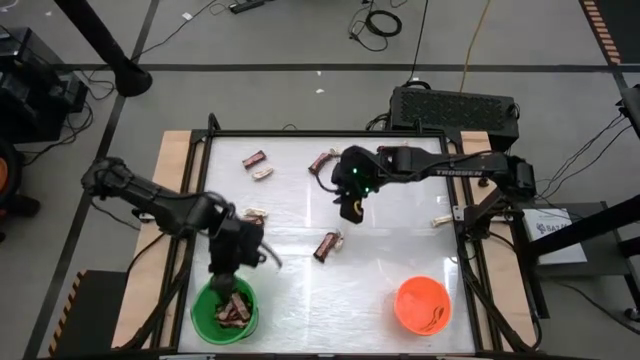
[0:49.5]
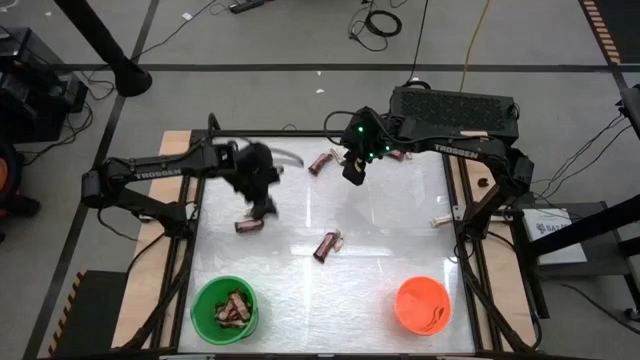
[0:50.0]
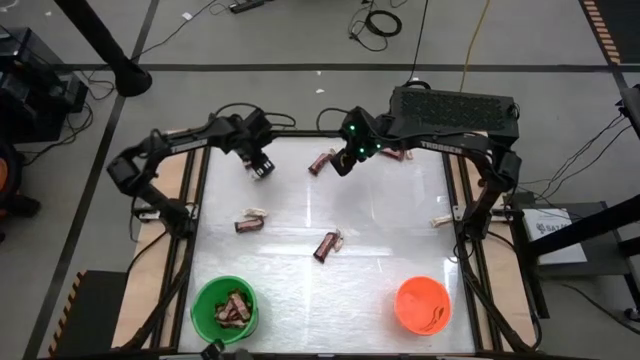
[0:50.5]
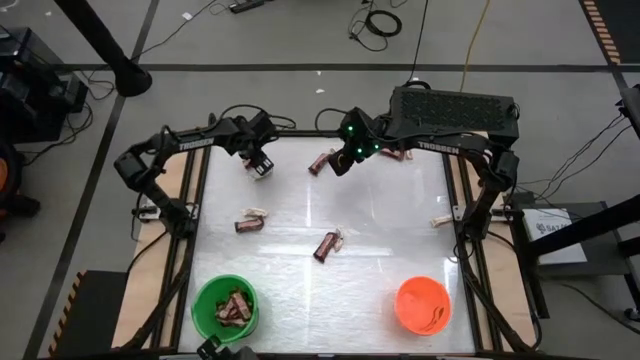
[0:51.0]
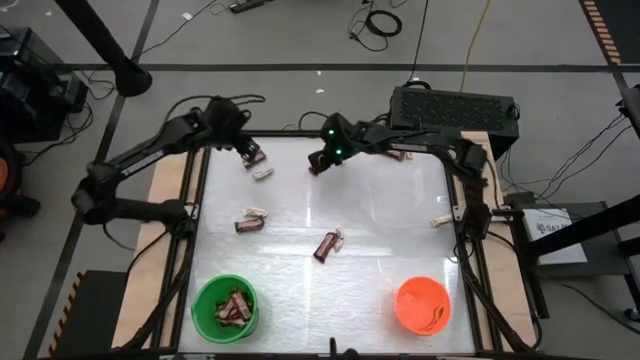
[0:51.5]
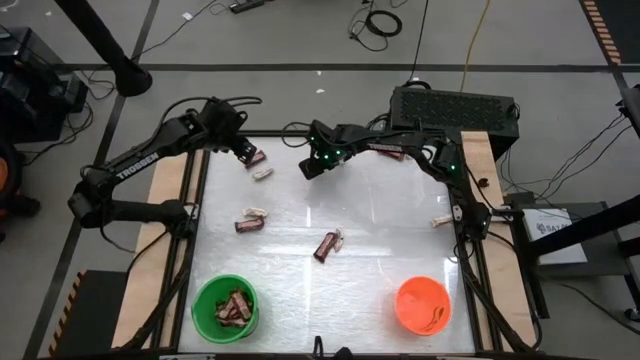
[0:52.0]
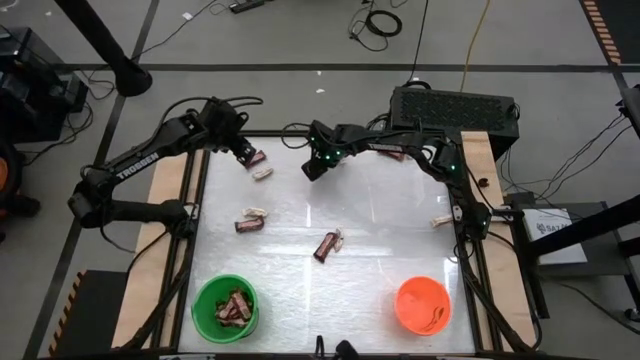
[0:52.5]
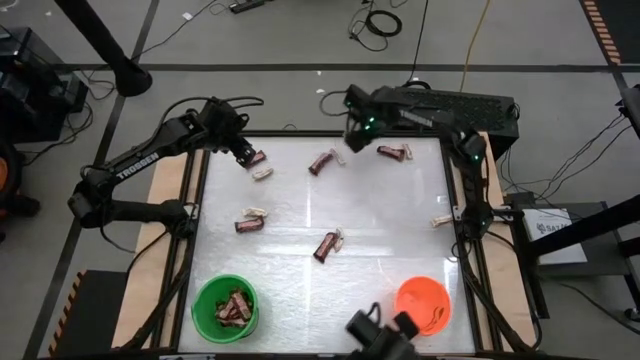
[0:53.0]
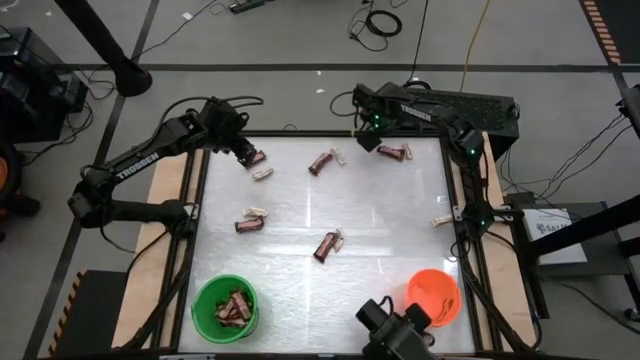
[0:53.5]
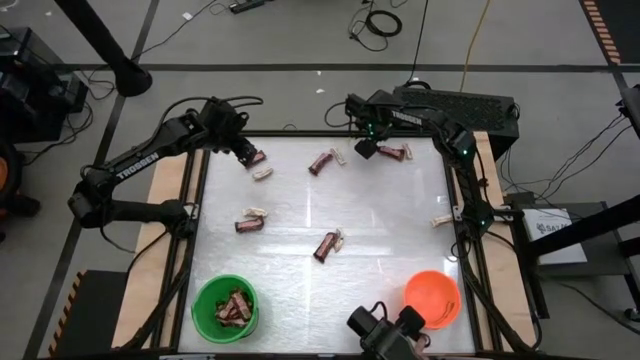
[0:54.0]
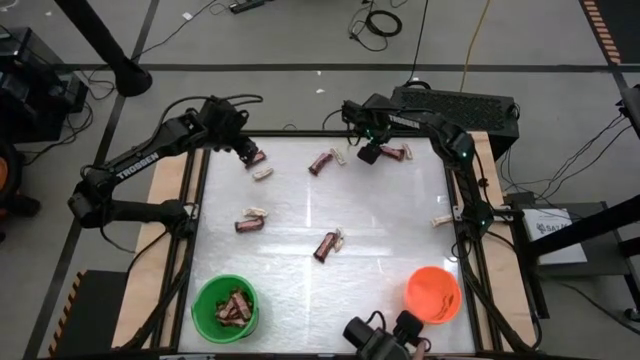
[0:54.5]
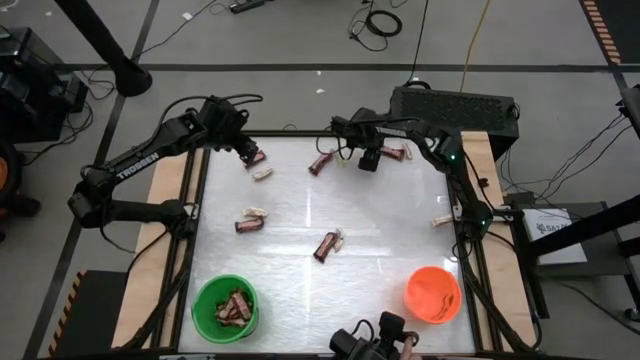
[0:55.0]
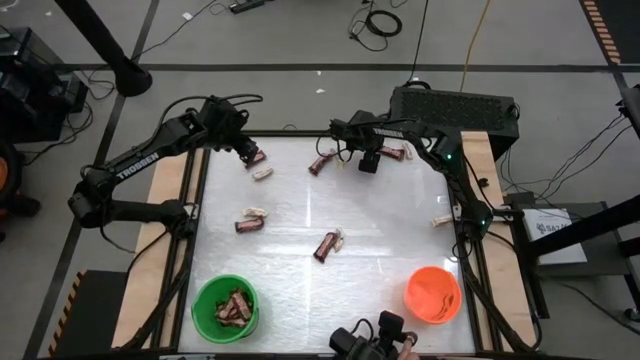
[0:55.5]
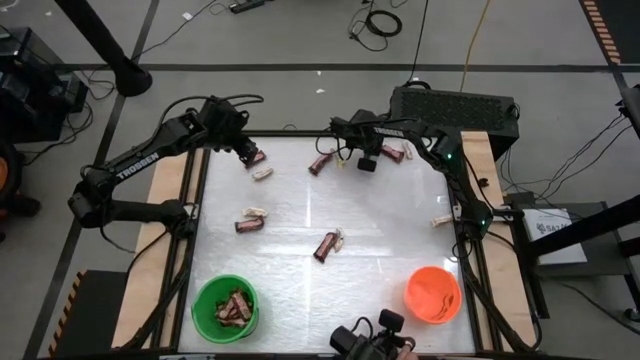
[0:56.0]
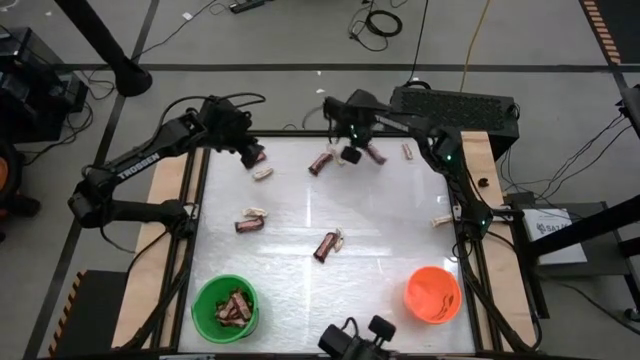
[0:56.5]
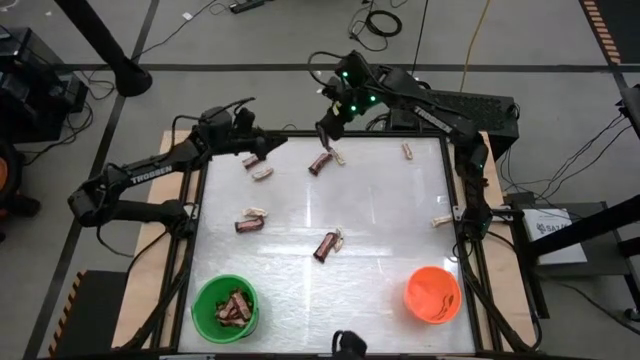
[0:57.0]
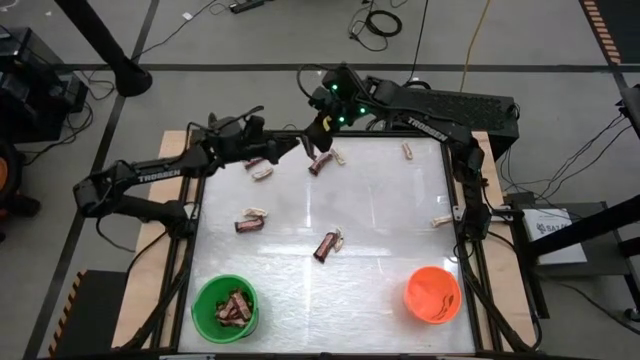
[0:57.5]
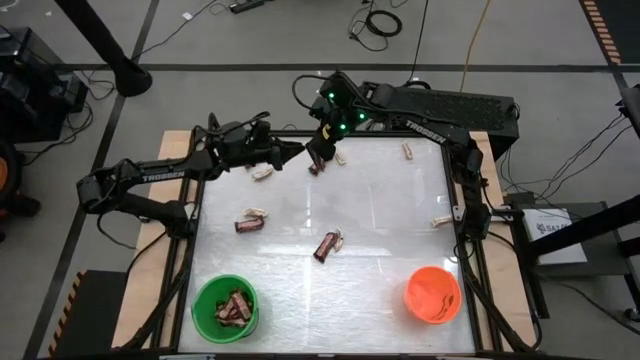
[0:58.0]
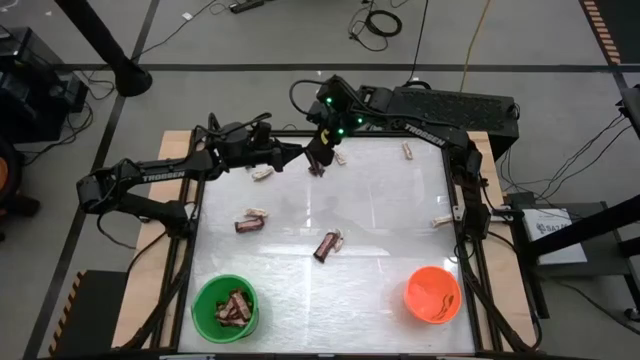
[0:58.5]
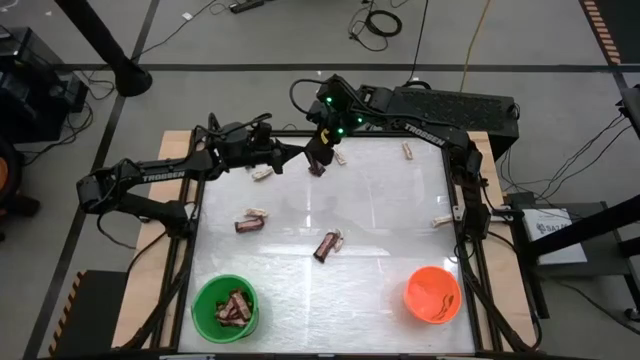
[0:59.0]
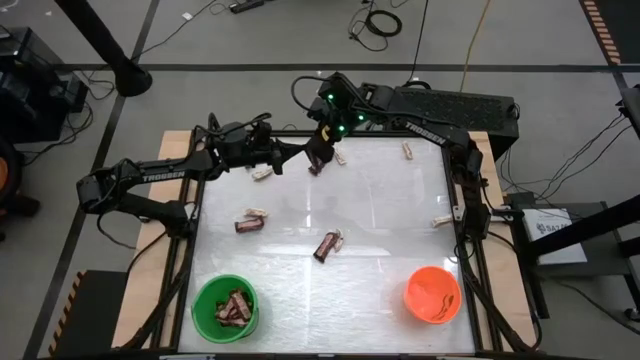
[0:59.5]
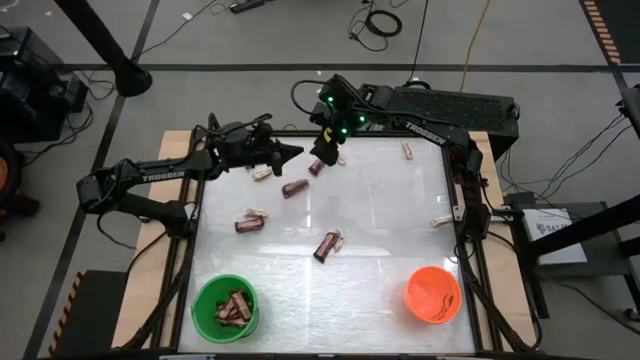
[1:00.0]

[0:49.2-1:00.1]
Task: Sort candy by brand, put in halloween buckets
Put the brown chocolate bar into the green bucket

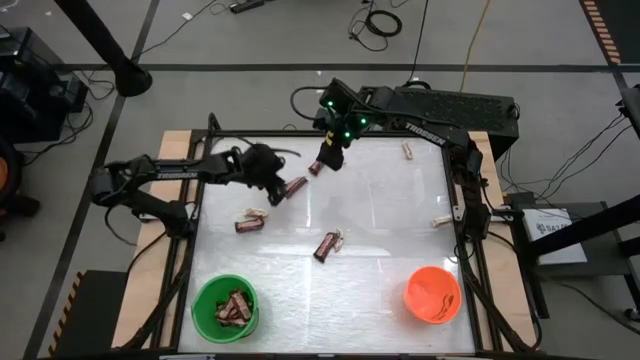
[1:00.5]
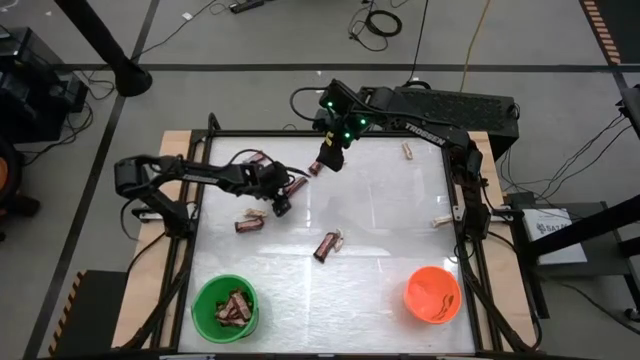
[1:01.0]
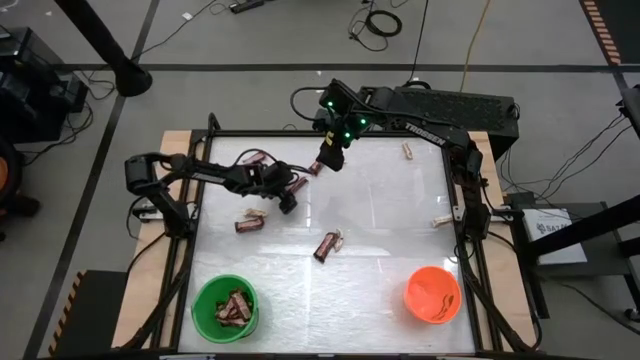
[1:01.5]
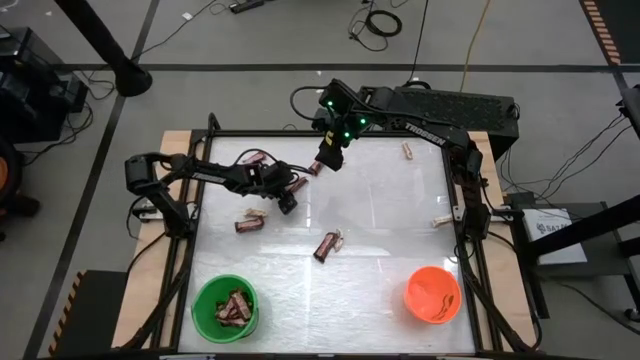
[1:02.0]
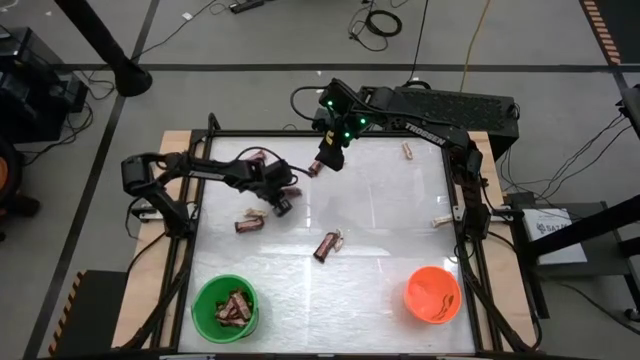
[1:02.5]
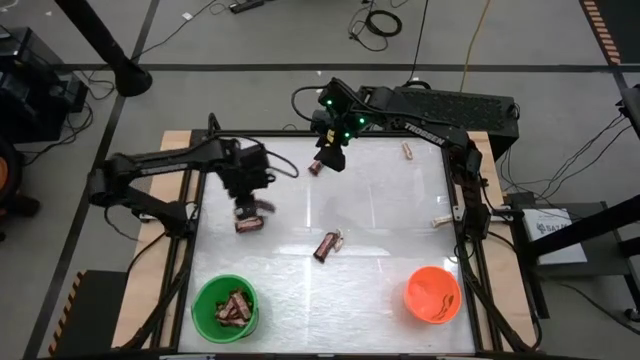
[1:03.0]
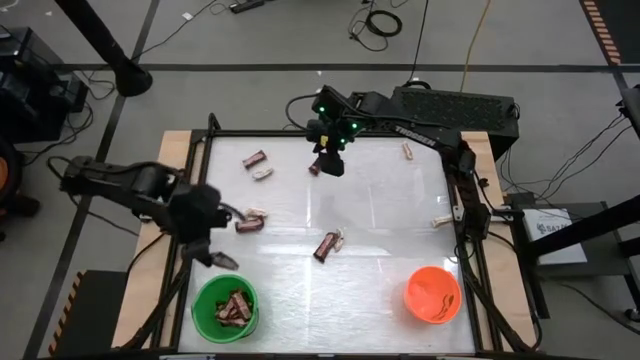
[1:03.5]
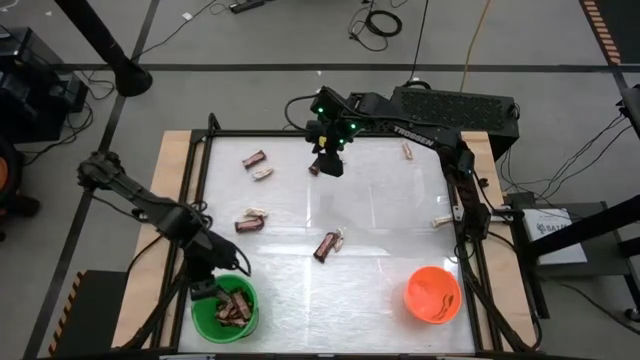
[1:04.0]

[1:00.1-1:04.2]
Put the brown chocolate bar into the green bucket

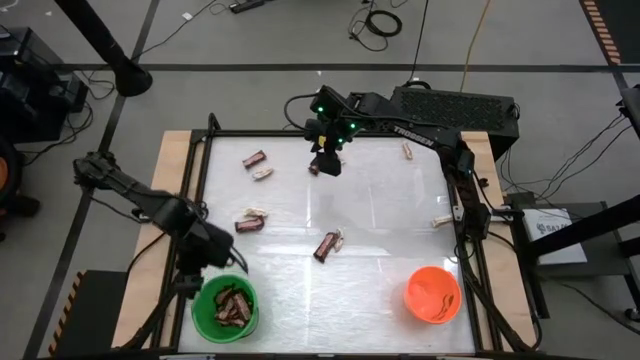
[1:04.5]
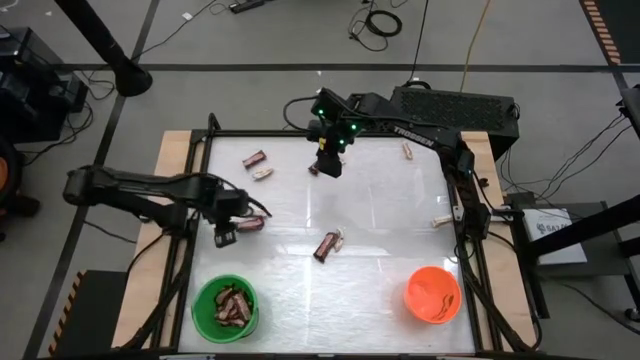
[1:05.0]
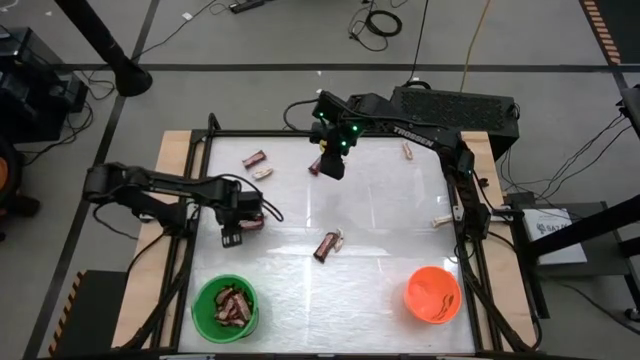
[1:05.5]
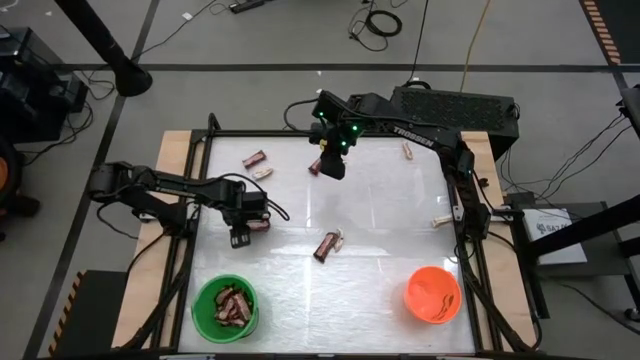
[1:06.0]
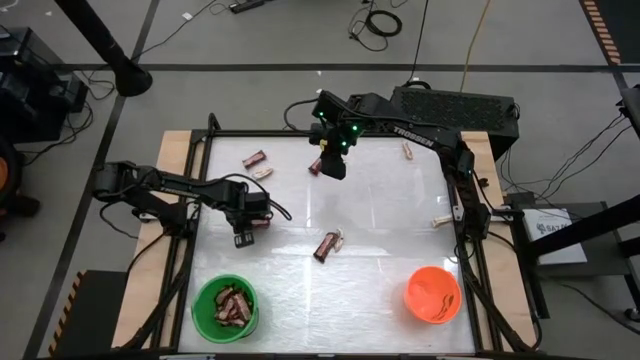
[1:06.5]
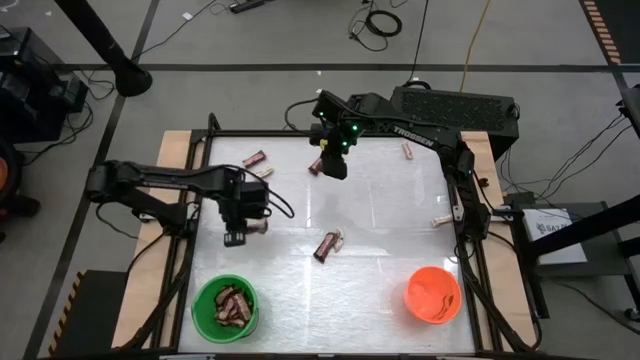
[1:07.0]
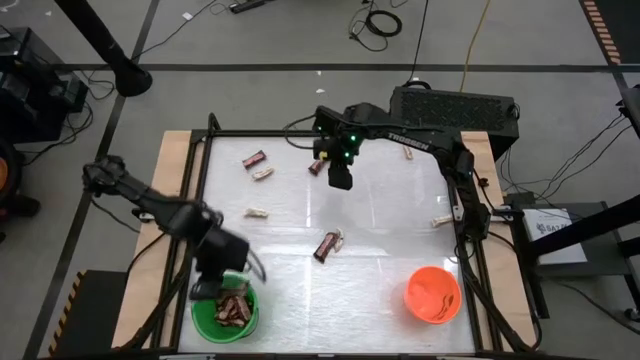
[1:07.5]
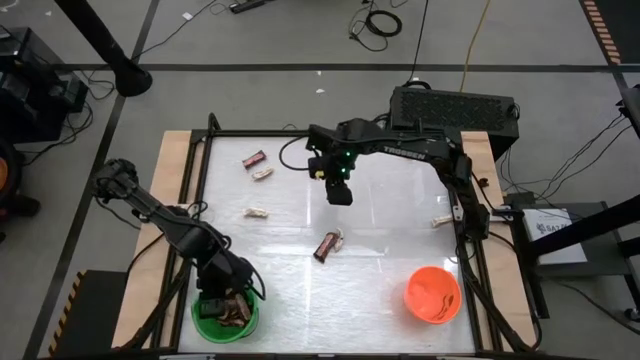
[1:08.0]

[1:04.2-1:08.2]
Put the brown chocolate bar into the green bucket

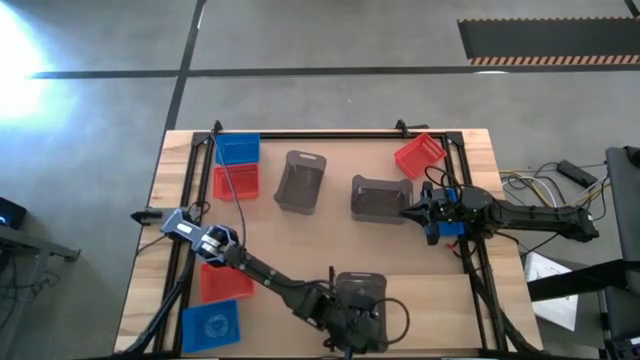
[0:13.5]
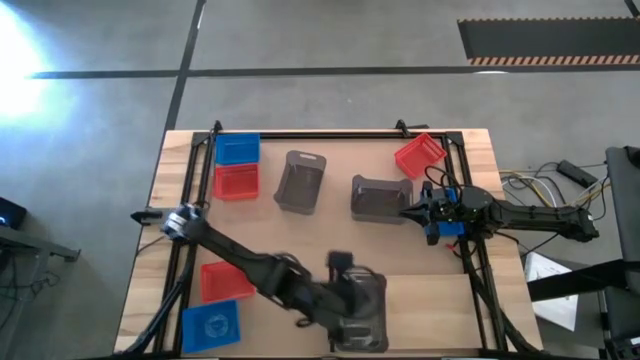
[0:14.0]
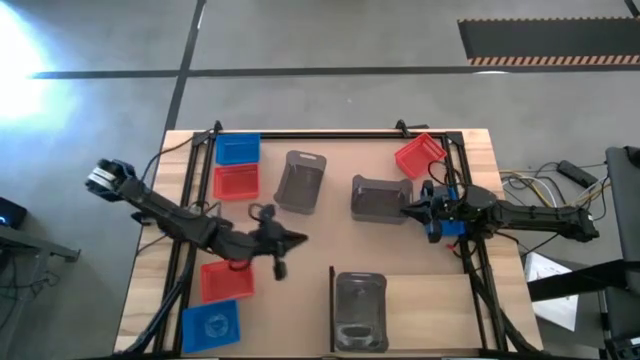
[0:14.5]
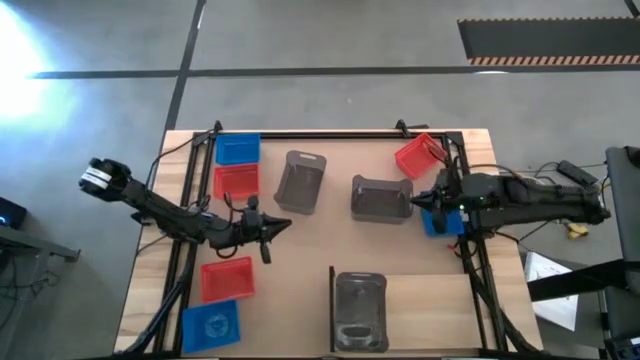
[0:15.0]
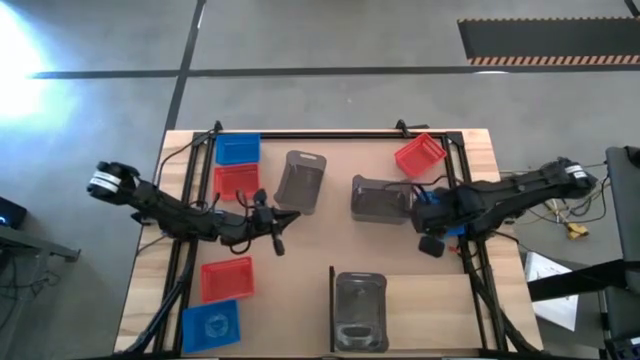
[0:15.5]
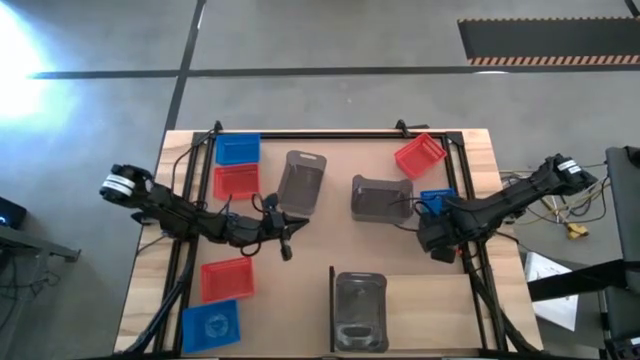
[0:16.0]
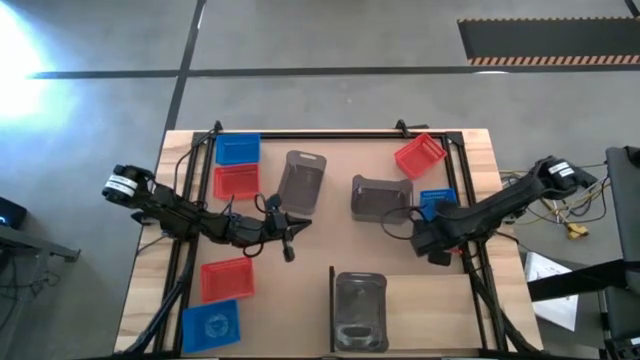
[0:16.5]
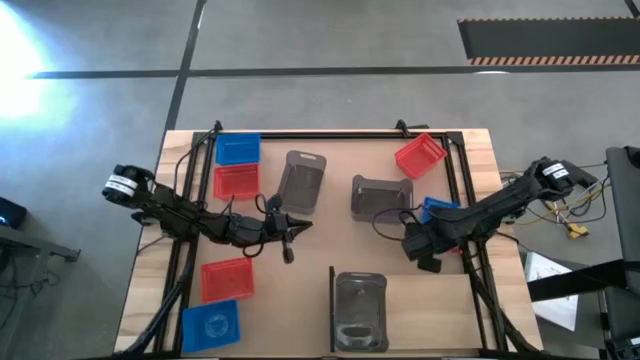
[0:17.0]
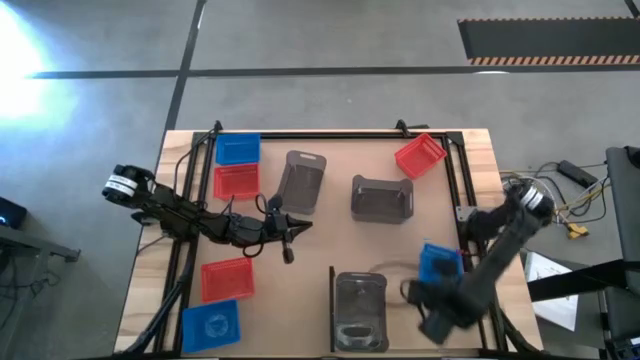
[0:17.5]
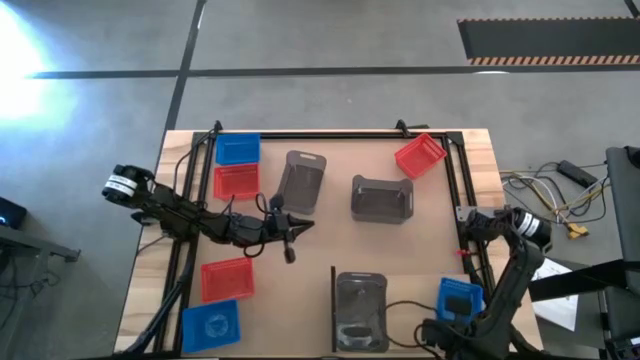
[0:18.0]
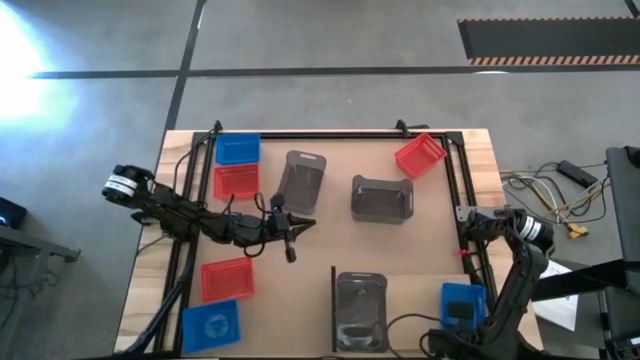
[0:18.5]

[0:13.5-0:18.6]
Task: Stack baskets on shelf by color
Put the middle right blue bin on the shelf
